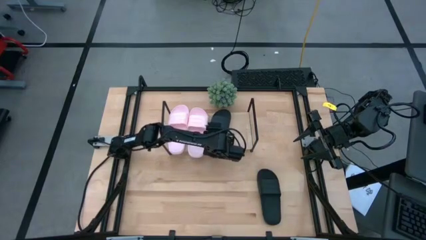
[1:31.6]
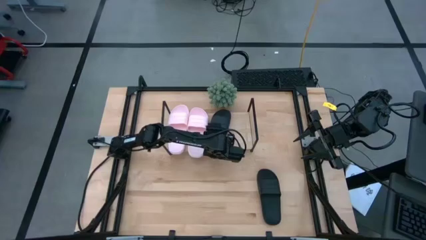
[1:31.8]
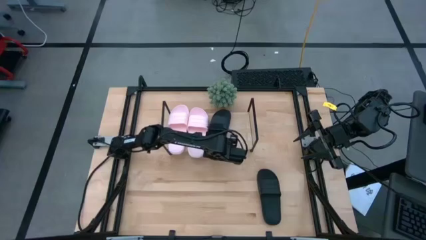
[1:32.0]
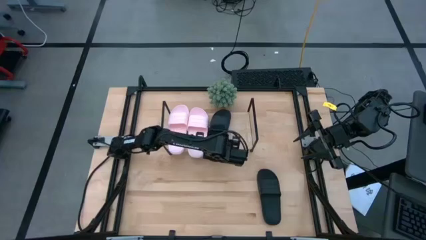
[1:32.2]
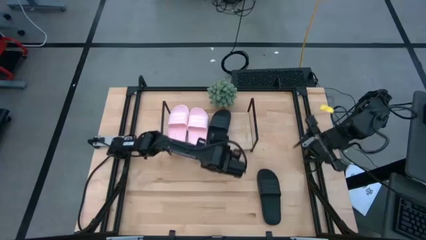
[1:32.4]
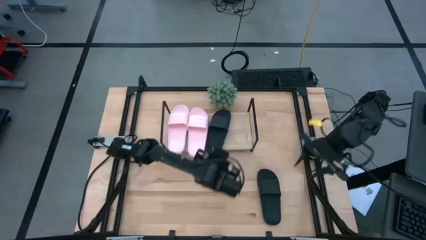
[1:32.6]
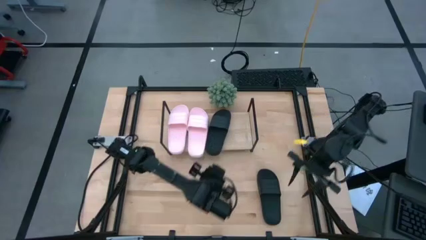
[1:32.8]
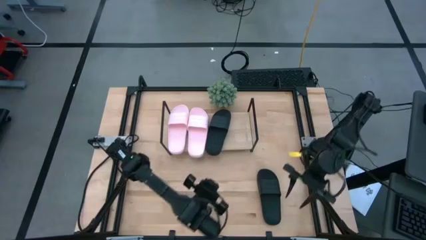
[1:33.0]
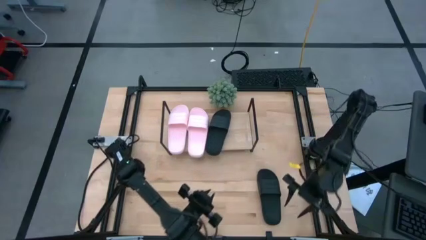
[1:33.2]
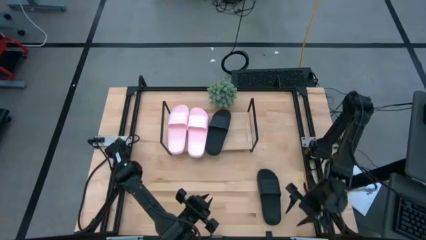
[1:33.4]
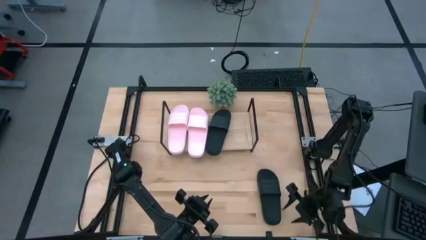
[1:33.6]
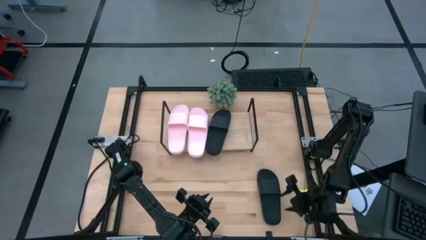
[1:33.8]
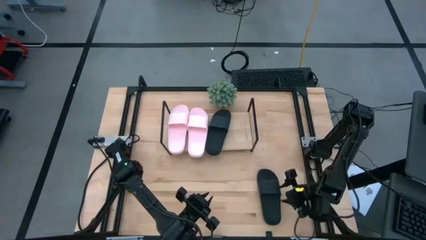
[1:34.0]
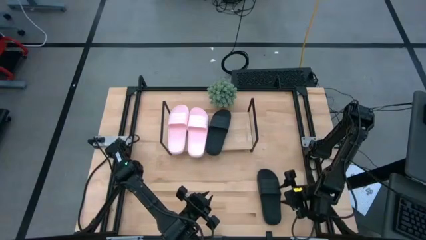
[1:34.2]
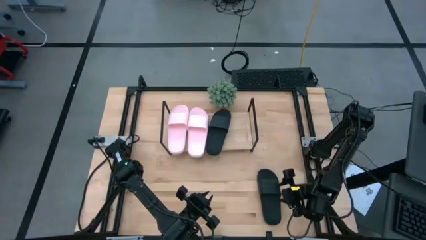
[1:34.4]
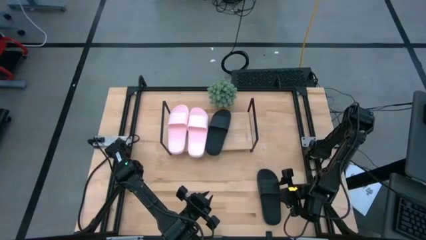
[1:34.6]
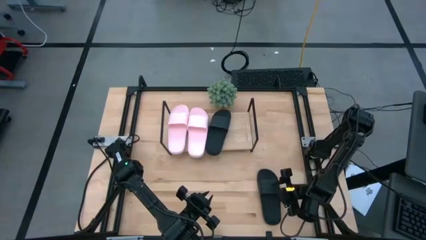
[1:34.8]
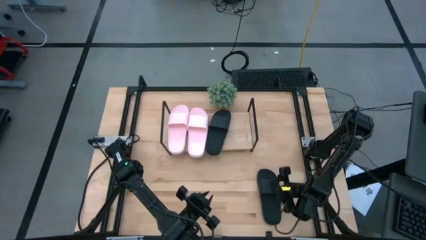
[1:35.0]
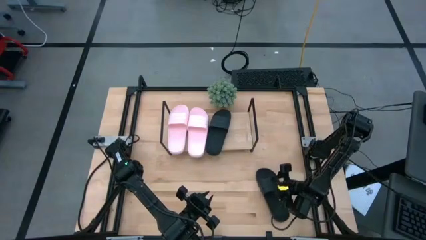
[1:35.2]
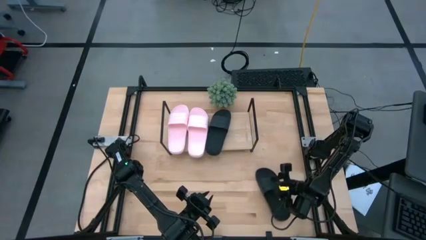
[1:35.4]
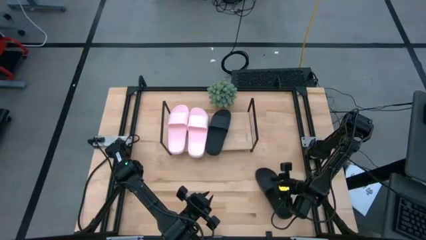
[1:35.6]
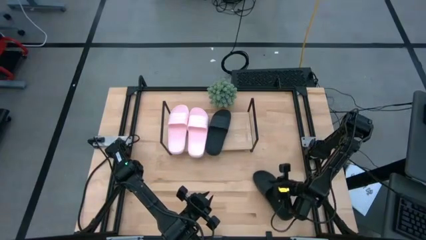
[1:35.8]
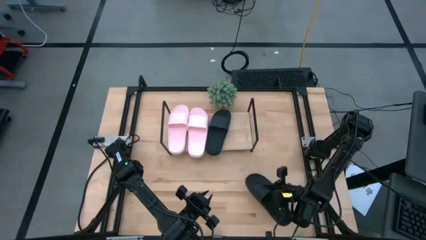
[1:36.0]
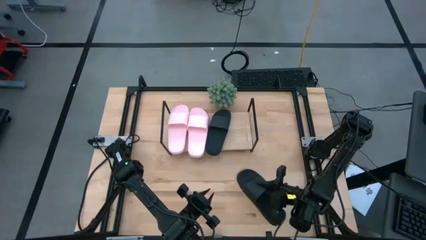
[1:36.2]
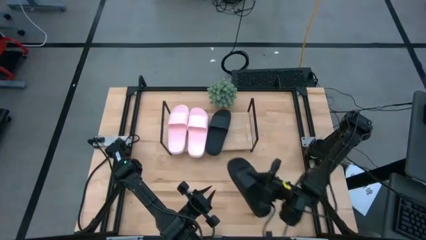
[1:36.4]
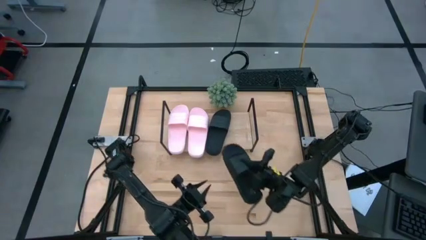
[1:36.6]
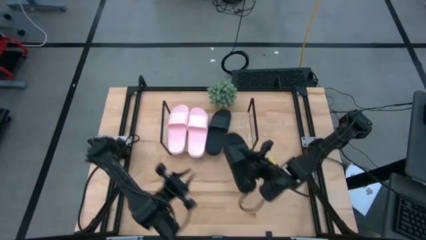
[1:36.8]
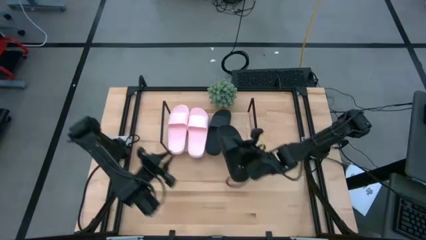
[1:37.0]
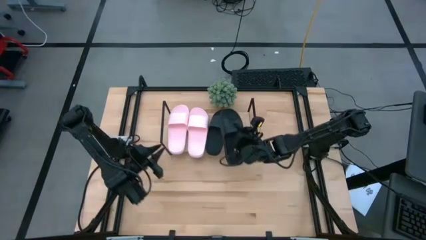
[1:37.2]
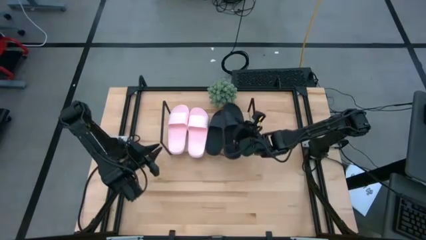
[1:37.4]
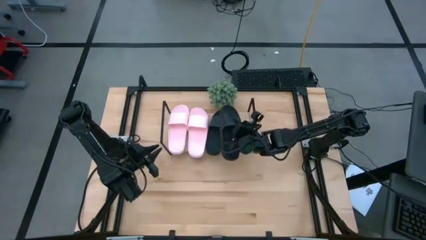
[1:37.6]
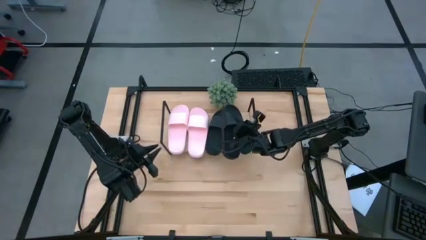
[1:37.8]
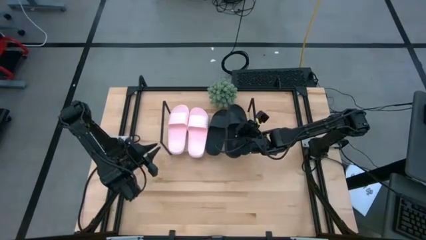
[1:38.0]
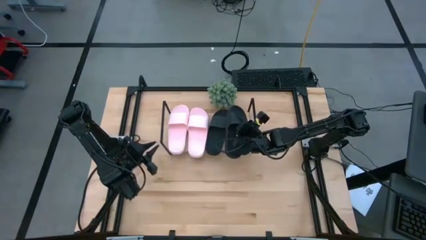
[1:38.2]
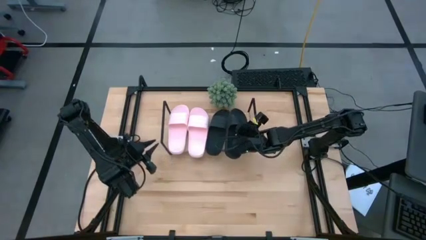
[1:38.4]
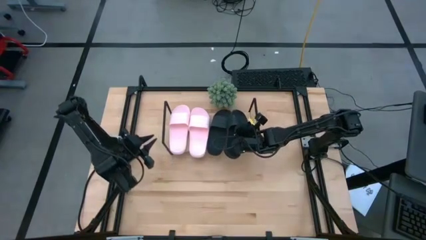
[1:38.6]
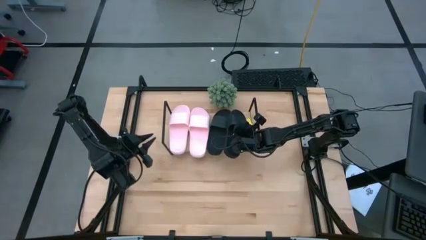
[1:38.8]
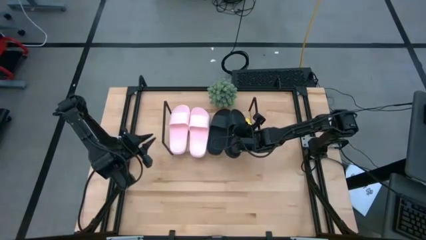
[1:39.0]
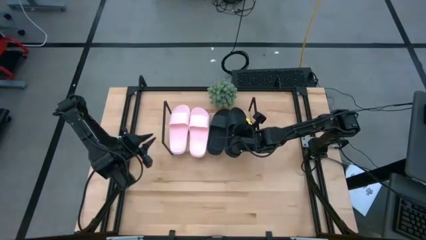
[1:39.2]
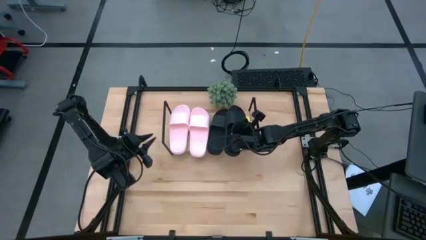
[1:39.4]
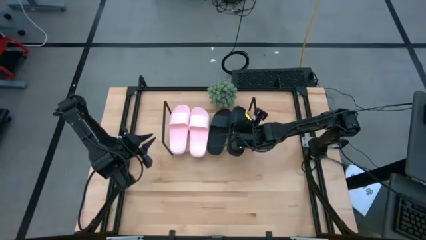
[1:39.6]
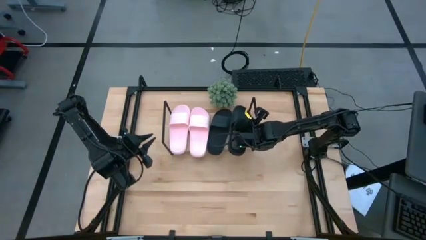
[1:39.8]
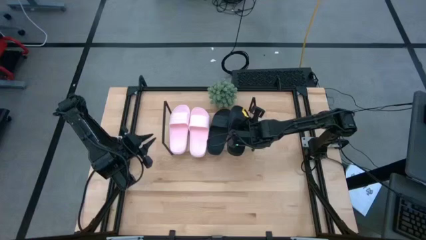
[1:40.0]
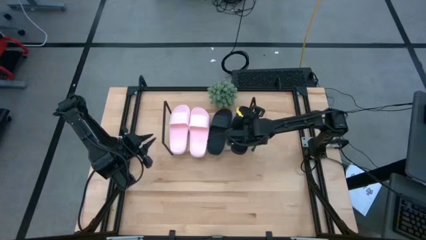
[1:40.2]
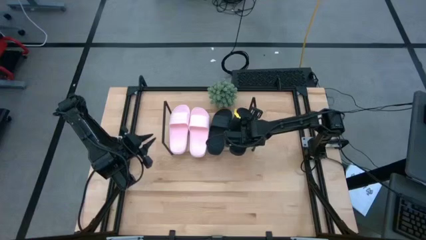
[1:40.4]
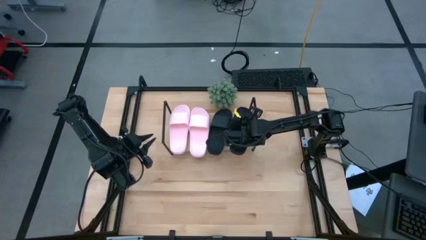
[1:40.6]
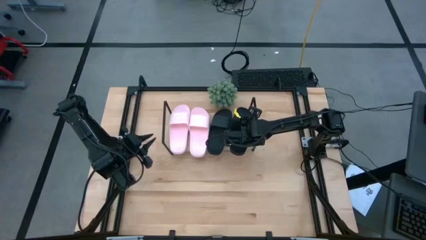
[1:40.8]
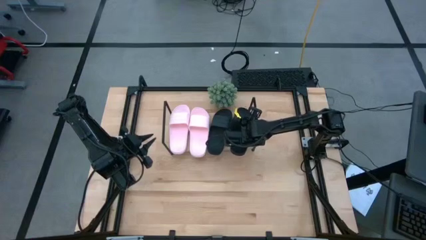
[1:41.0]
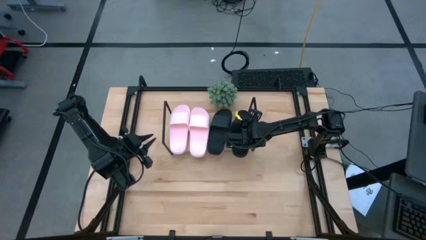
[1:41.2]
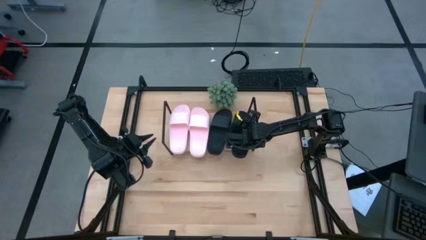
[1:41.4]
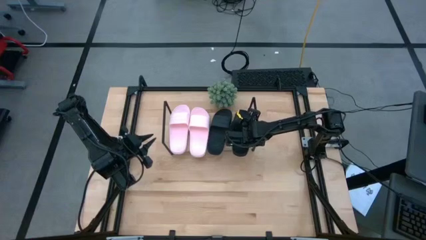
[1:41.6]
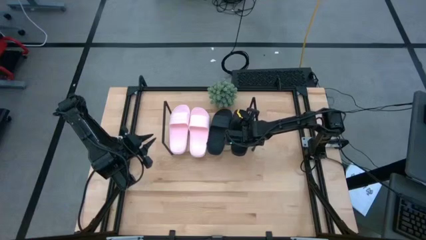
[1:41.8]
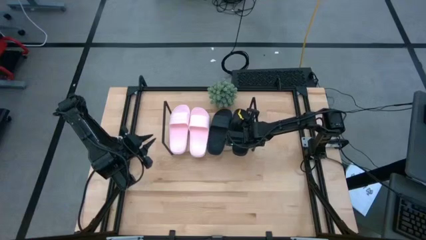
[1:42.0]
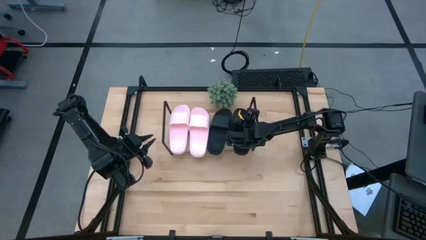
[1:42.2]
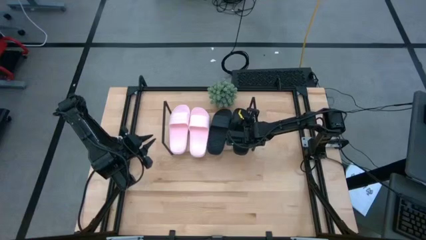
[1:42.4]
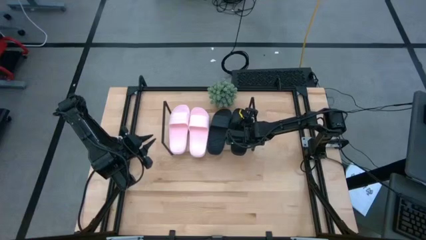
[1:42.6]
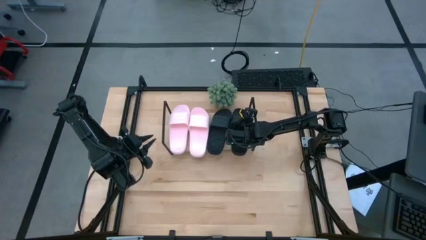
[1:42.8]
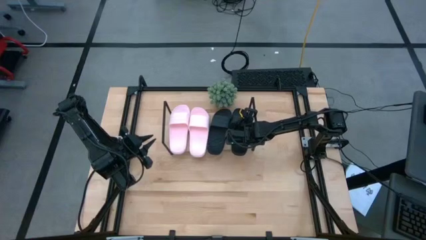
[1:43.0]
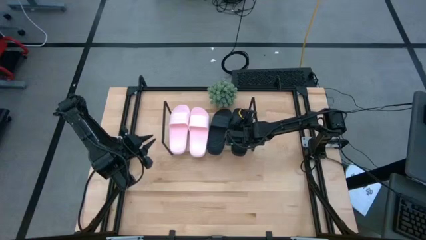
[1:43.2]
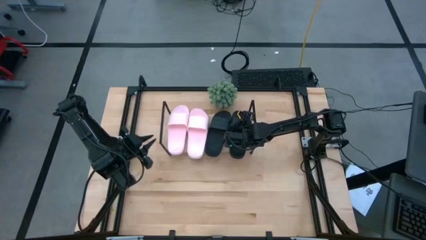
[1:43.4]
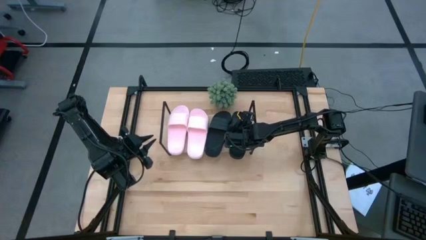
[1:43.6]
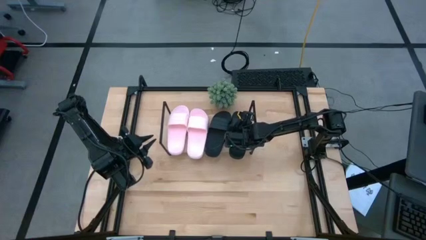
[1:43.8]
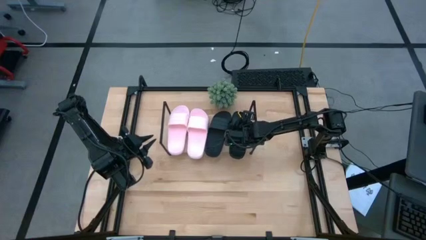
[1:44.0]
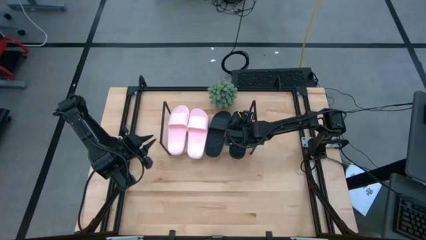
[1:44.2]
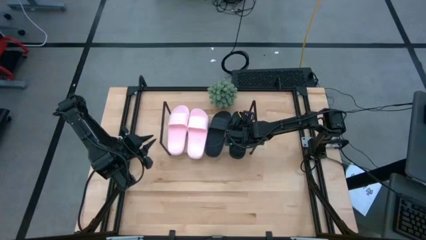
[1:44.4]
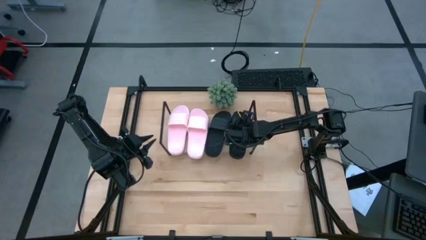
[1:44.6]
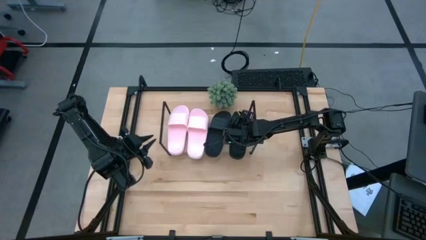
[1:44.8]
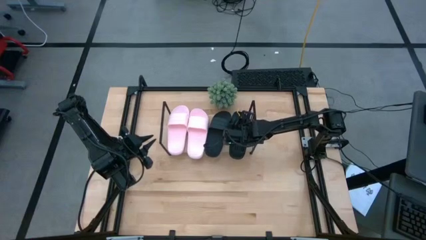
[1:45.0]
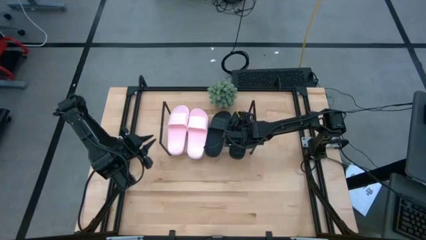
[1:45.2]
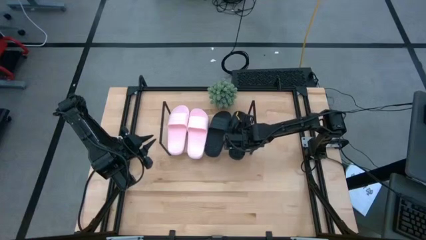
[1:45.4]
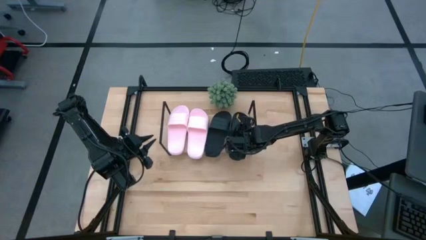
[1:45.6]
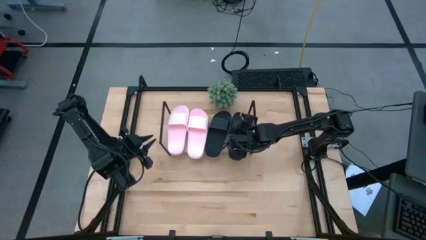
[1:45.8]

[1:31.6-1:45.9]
Task: Pick and place slides into the shelf
Put the black slide on the shelf
